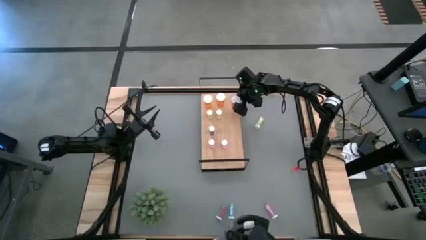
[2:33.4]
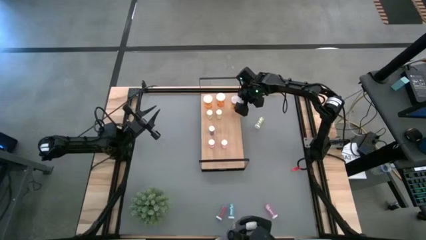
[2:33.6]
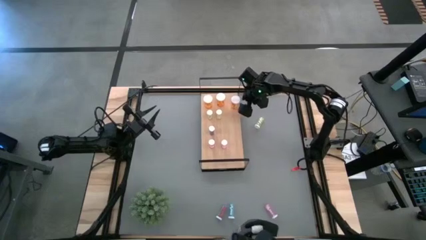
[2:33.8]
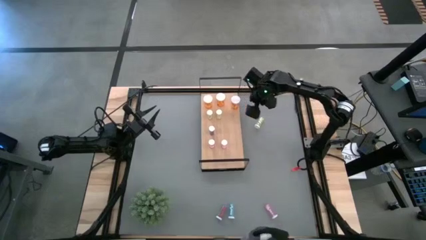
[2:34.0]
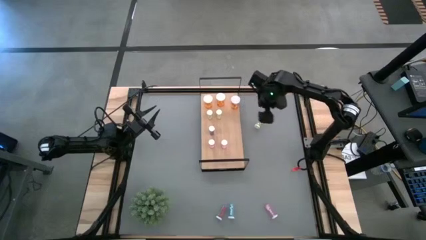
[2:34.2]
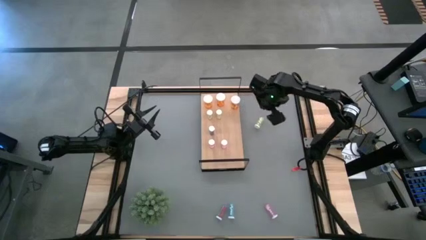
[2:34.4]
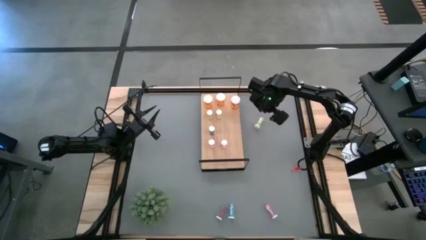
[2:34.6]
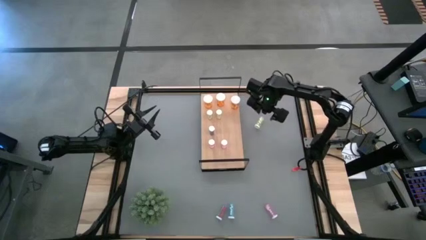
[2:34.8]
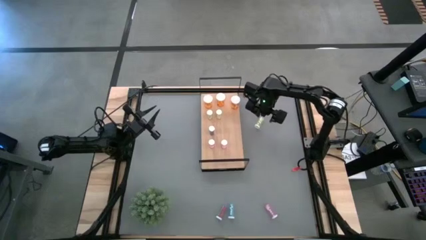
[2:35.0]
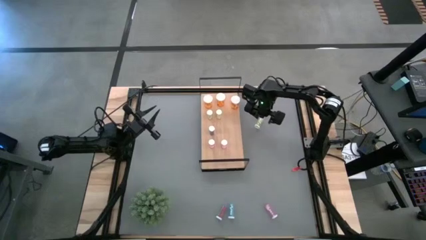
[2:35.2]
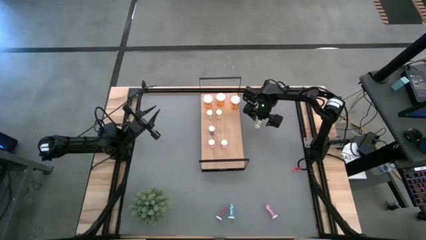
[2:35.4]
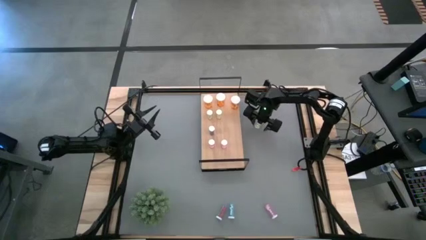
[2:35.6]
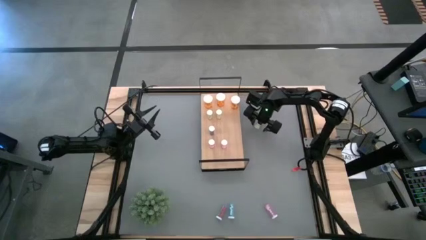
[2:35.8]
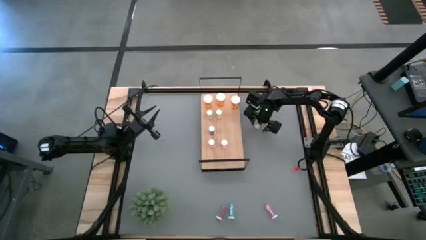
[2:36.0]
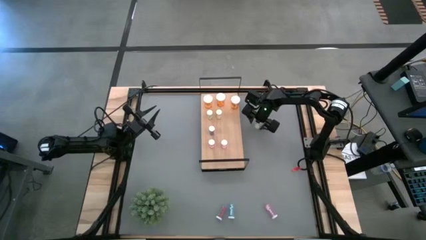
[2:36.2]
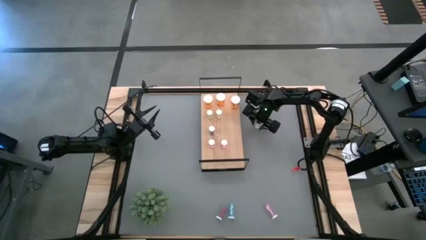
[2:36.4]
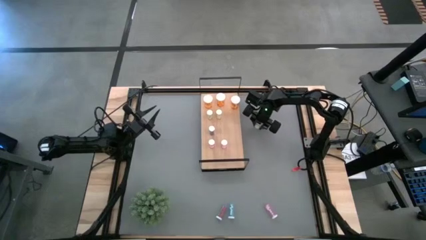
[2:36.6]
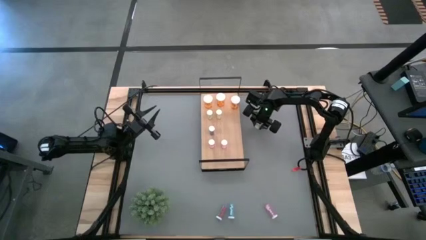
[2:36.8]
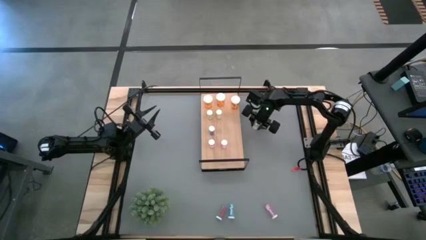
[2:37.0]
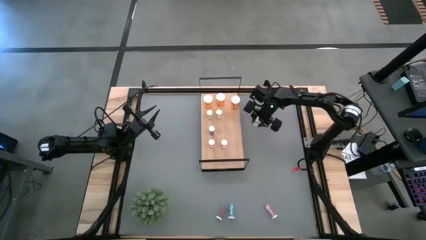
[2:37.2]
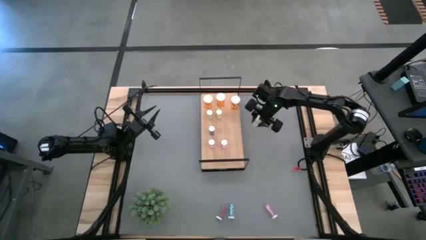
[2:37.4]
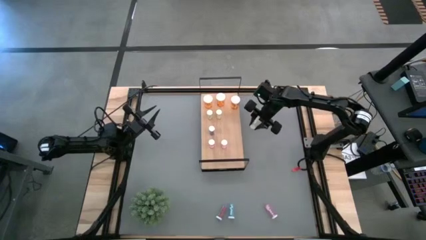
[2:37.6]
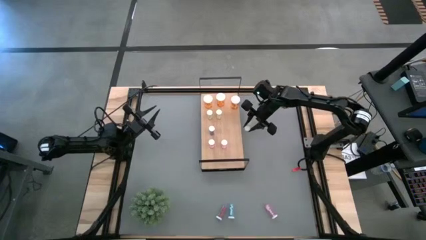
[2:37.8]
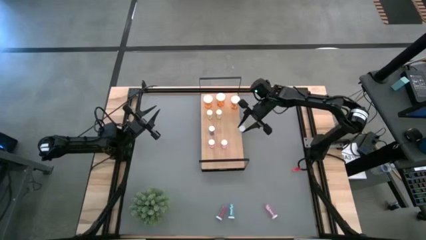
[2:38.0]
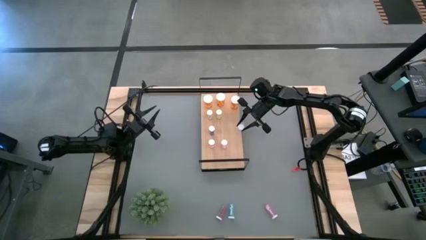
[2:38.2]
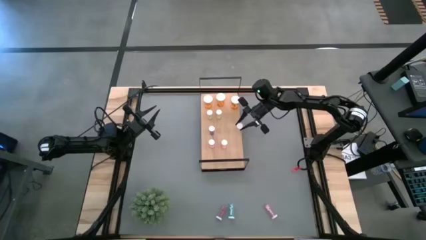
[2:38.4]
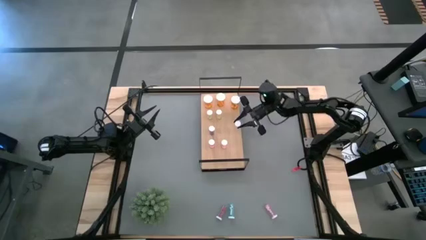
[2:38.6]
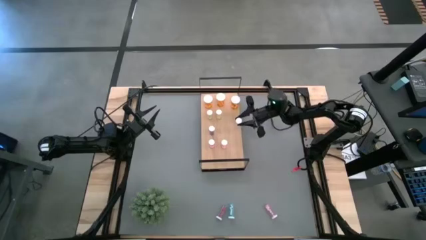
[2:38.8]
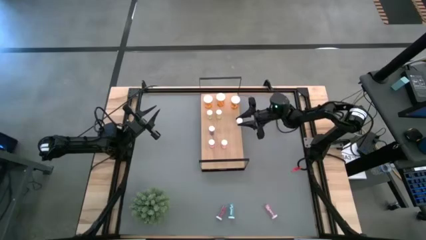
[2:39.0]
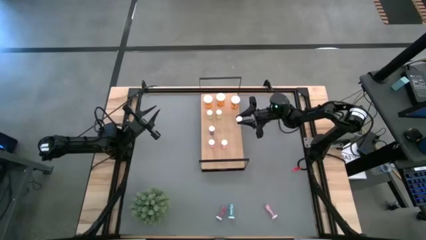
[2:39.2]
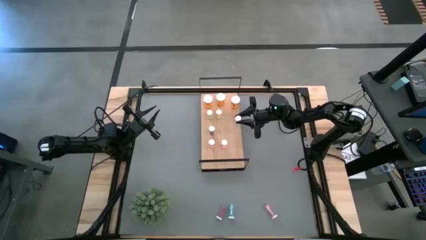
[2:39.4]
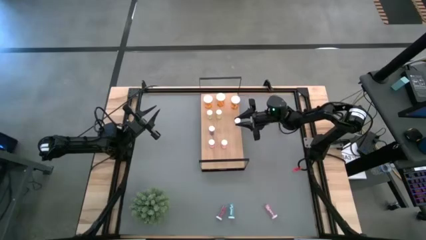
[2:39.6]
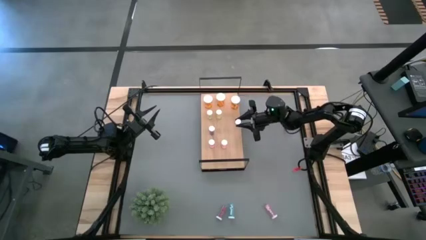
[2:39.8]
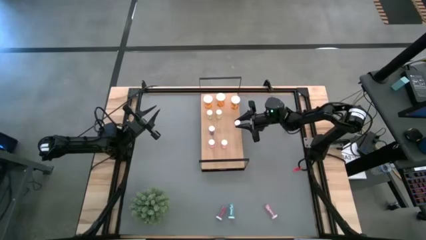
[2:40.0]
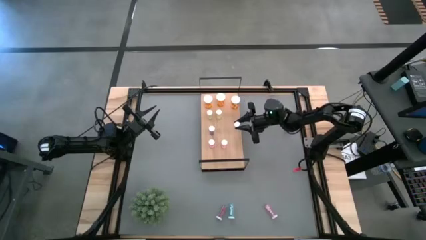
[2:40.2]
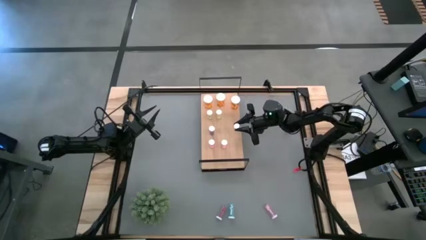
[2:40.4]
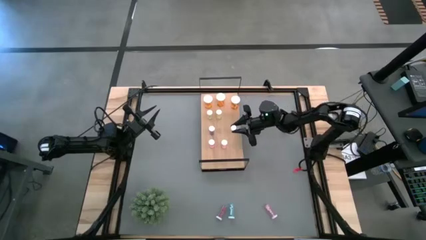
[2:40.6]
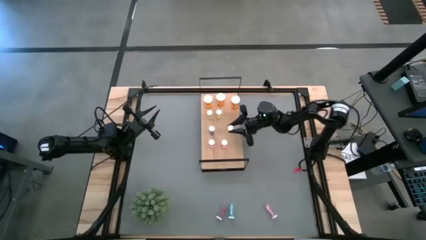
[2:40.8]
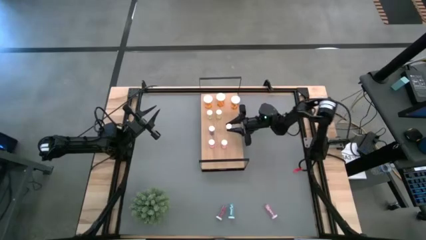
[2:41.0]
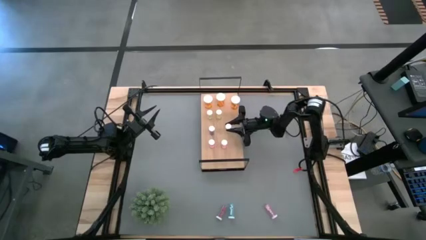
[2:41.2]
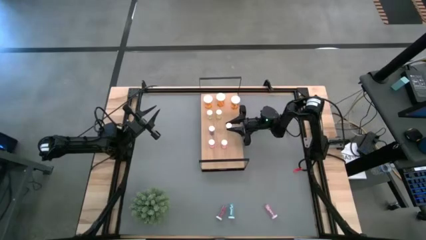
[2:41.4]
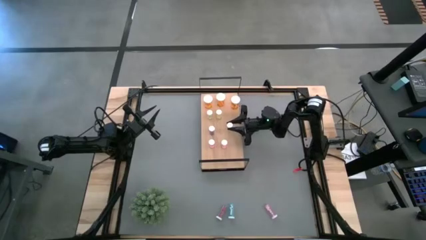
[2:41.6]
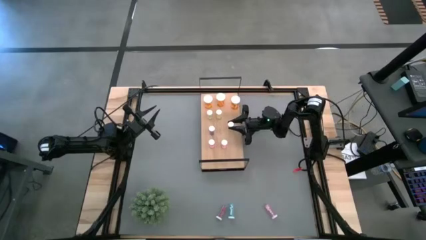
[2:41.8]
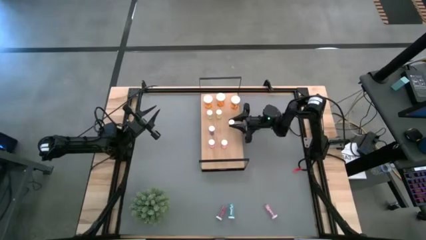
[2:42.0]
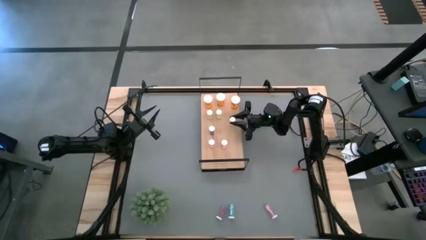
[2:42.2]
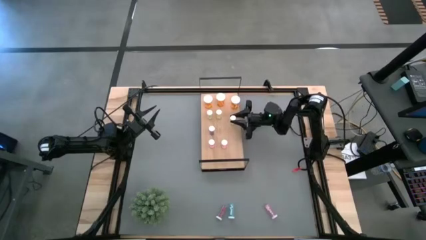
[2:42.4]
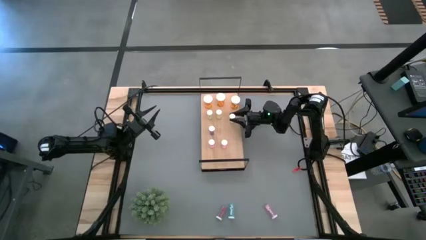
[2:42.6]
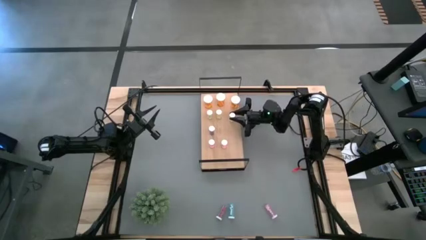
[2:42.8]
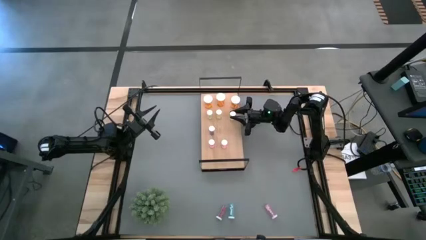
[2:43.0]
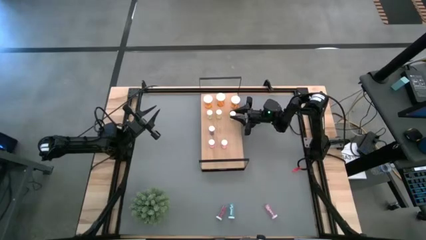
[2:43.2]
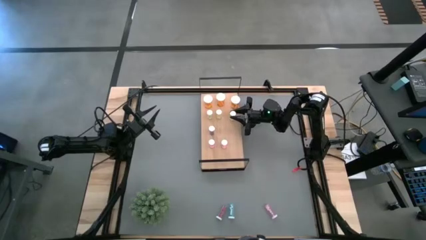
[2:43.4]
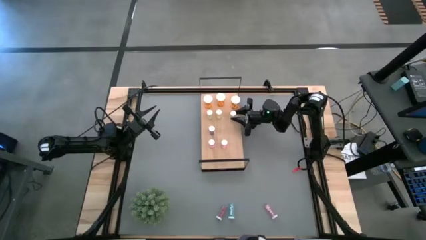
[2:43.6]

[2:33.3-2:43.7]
Task: Pick and place medicine bottles onto shelf by color
Put the yellow pill bottle on the shelf aligned with the other yellow pill bottles

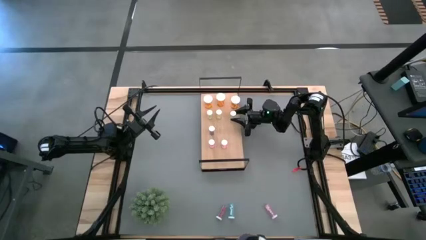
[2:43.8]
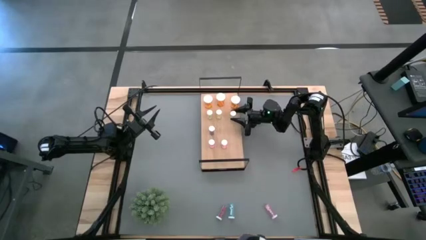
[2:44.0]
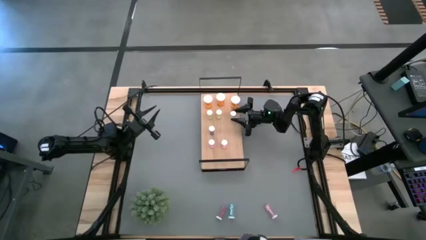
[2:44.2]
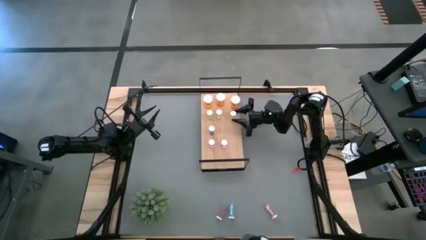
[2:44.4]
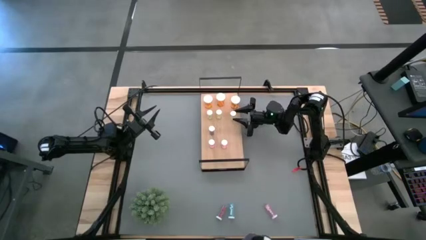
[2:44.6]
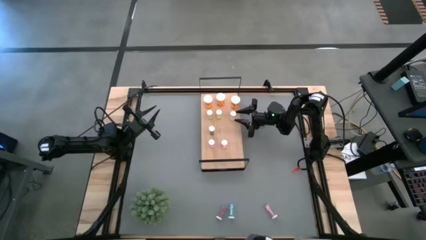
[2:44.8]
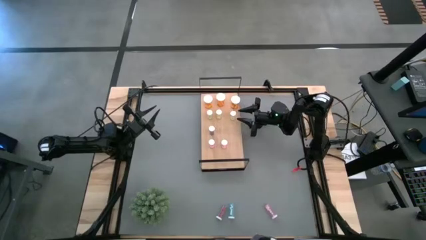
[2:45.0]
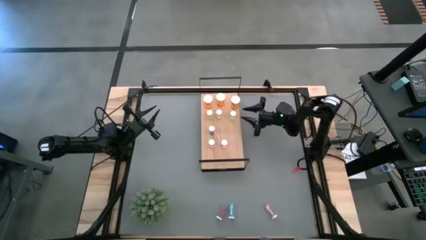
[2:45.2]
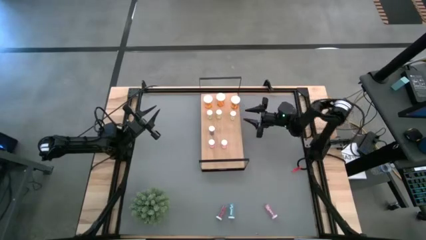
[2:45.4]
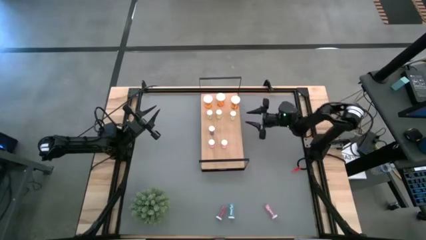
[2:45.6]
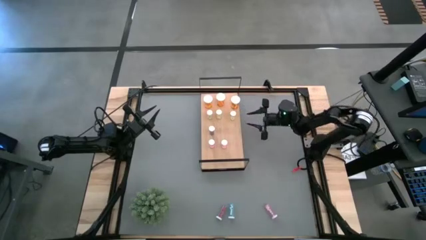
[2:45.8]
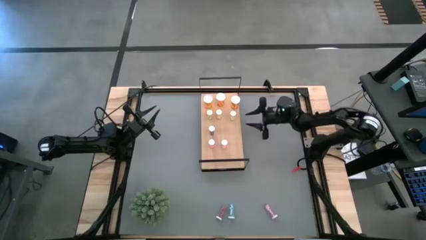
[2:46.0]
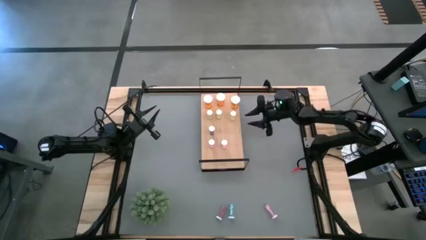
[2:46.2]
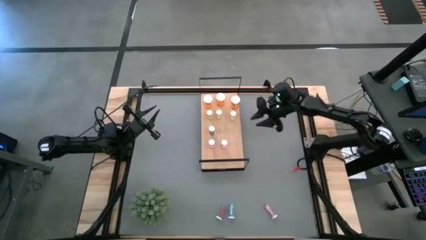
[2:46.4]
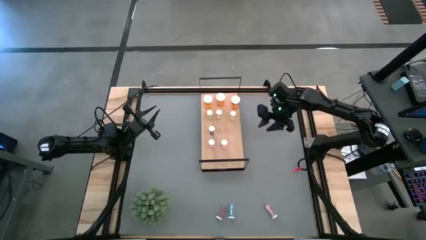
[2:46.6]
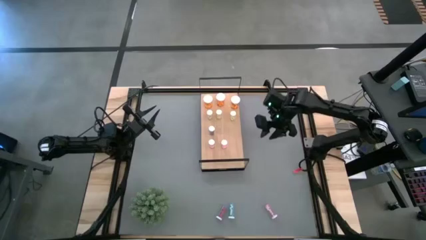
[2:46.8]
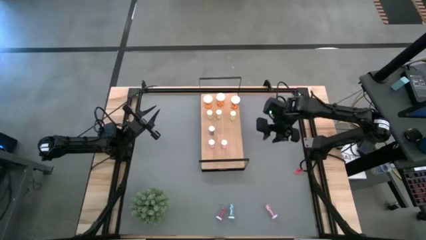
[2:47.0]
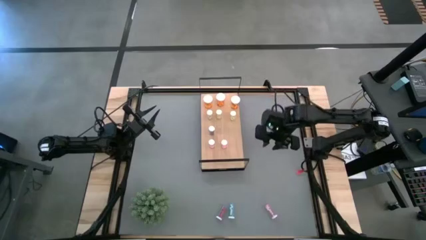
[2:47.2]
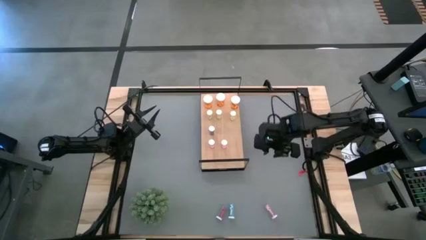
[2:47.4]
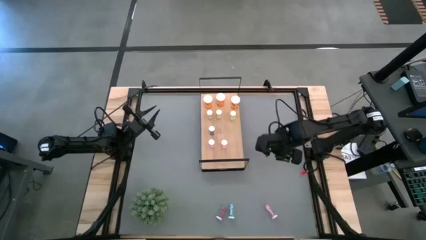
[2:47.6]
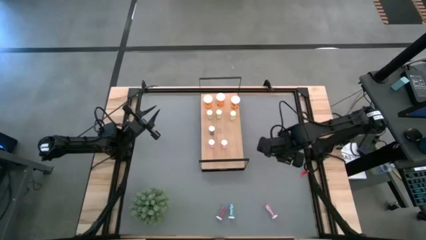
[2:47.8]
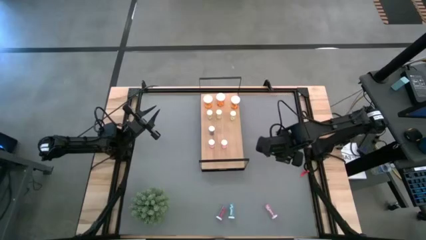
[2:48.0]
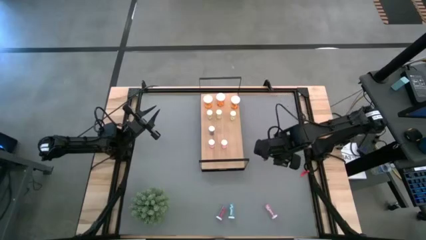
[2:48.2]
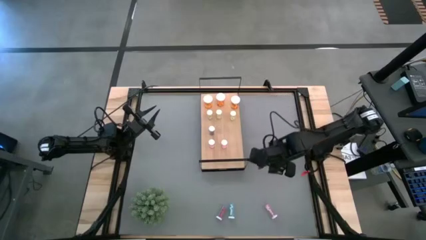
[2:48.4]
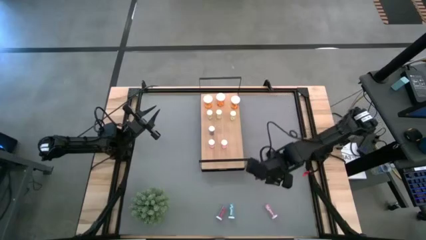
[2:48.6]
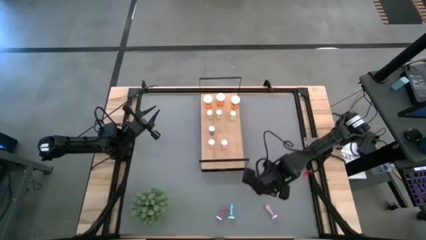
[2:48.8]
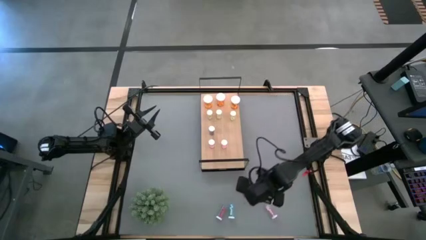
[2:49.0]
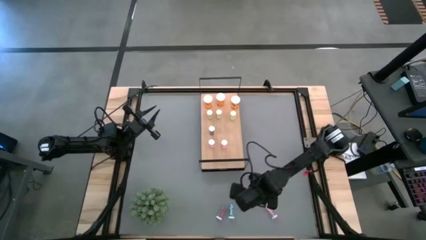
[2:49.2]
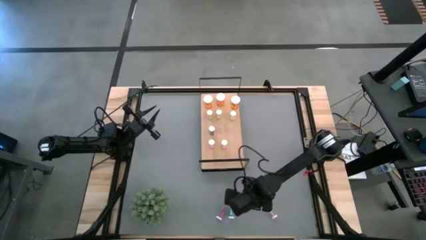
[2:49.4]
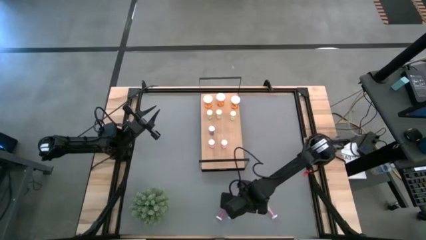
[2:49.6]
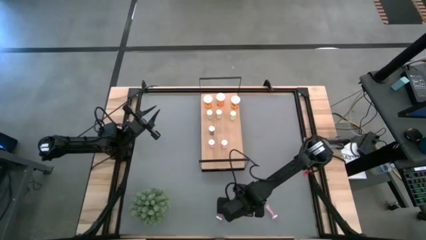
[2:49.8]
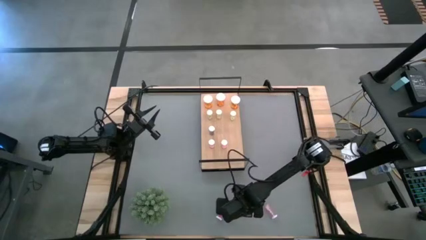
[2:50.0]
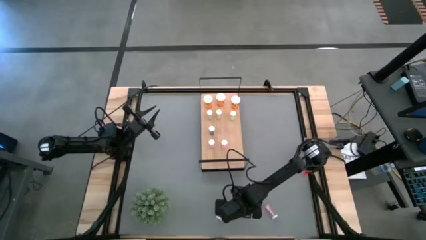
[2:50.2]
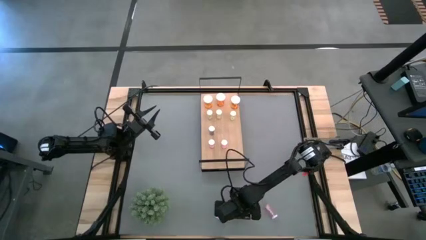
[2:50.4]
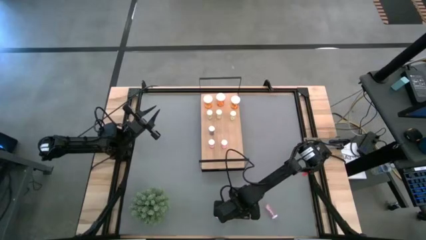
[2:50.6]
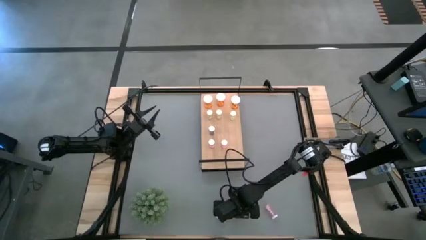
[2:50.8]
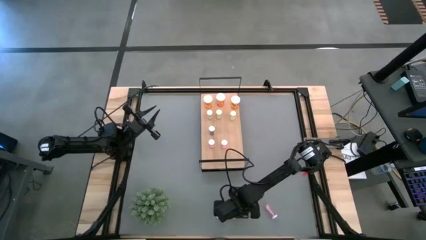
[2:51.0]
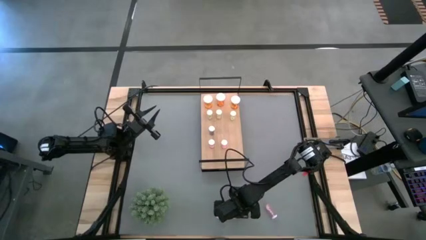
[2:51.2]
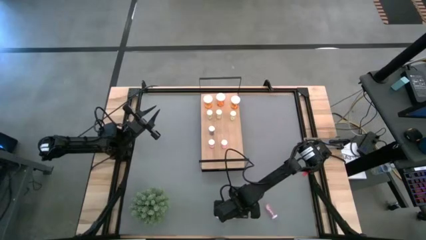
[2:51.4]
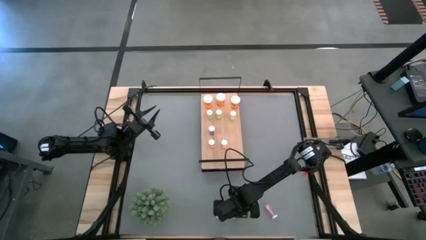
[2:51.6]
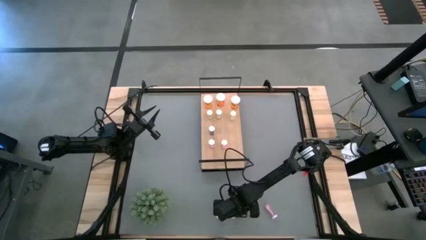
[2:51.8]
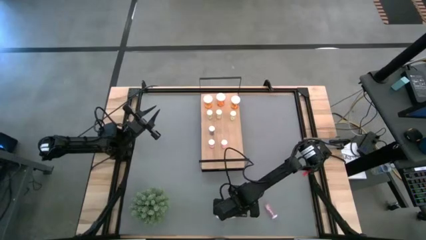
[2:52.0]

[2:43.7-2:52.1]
Put the right blue pill bottle on the shelf aligned with the other blue pill bottle
